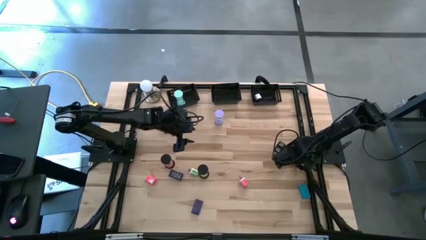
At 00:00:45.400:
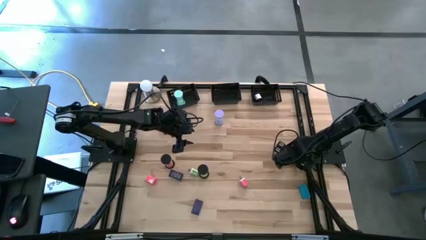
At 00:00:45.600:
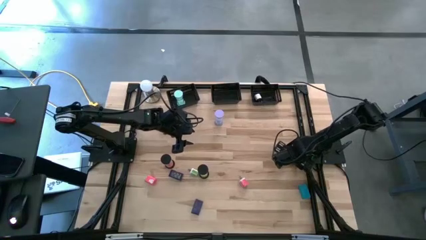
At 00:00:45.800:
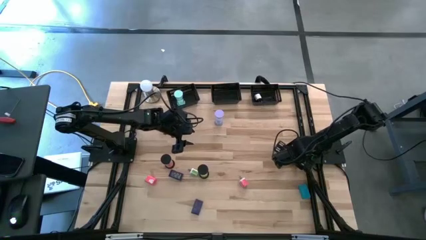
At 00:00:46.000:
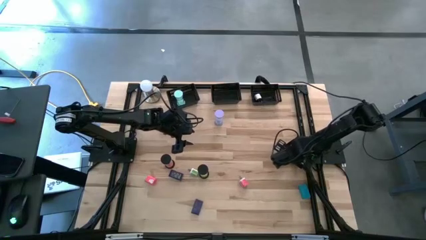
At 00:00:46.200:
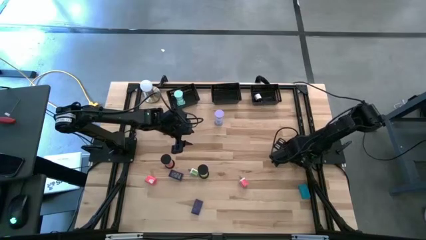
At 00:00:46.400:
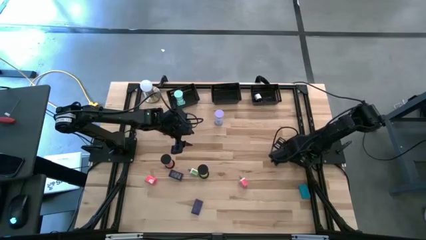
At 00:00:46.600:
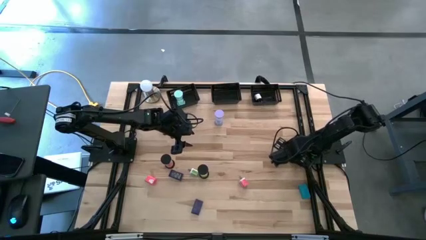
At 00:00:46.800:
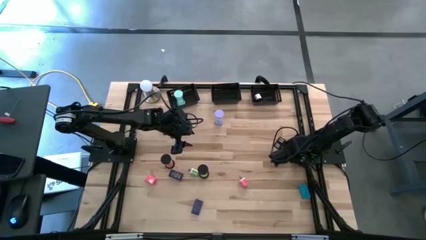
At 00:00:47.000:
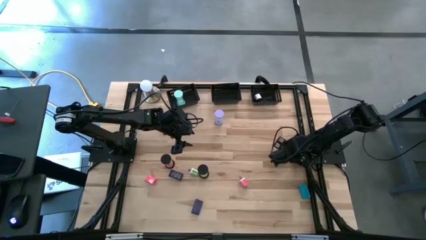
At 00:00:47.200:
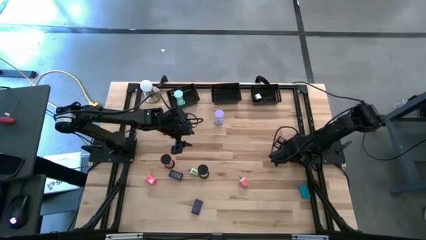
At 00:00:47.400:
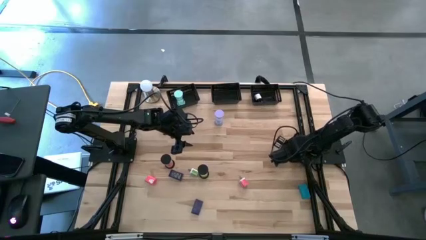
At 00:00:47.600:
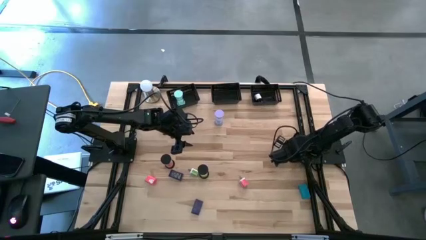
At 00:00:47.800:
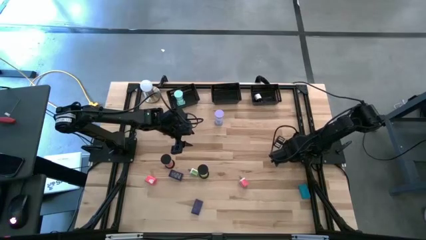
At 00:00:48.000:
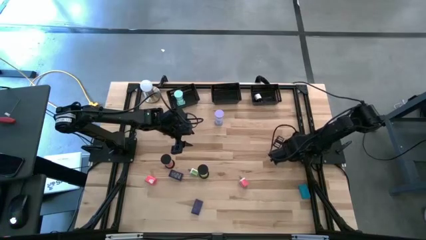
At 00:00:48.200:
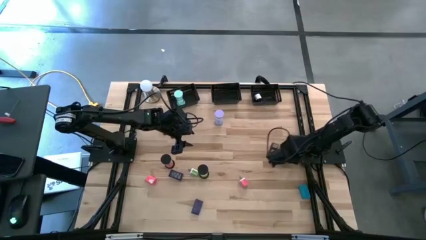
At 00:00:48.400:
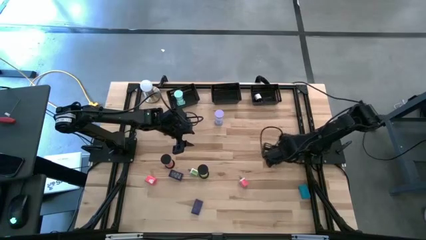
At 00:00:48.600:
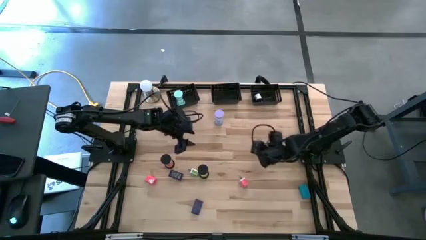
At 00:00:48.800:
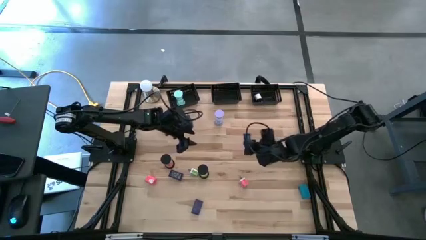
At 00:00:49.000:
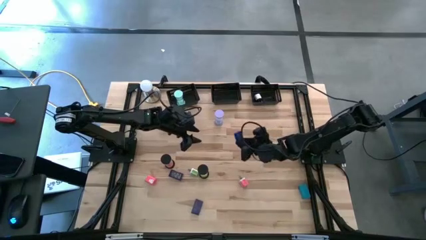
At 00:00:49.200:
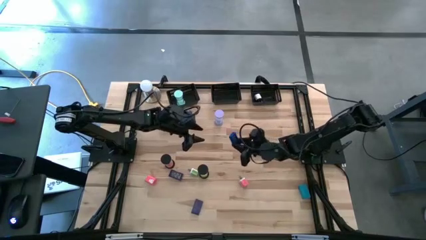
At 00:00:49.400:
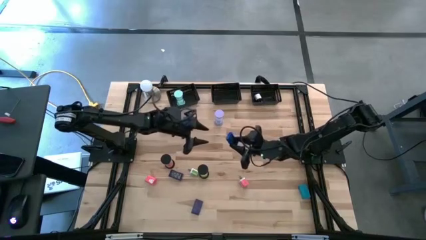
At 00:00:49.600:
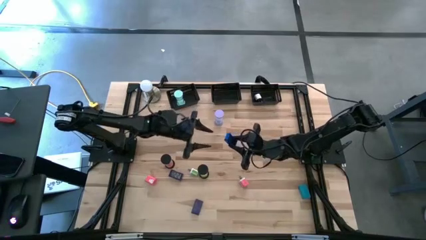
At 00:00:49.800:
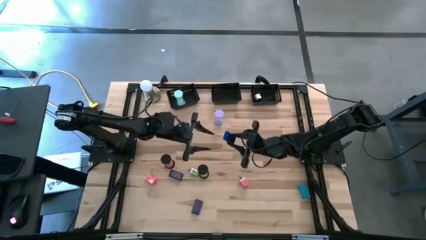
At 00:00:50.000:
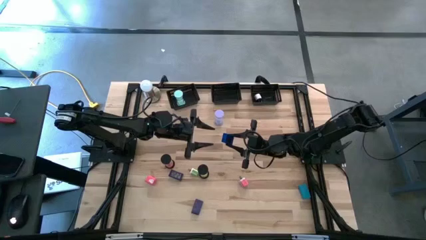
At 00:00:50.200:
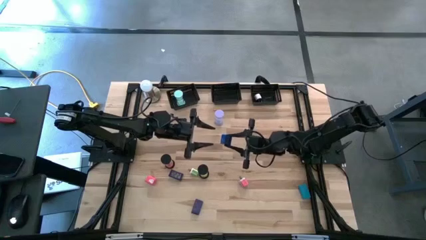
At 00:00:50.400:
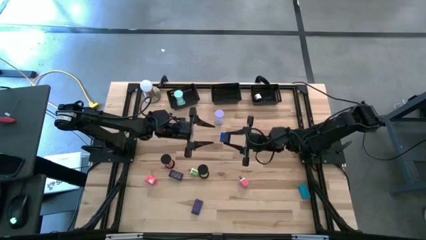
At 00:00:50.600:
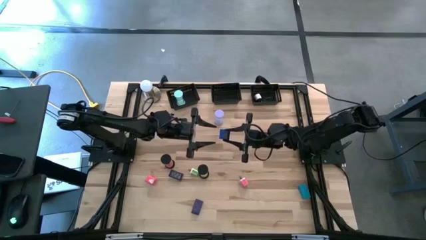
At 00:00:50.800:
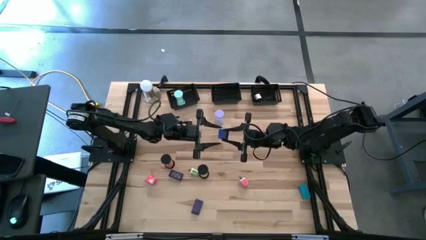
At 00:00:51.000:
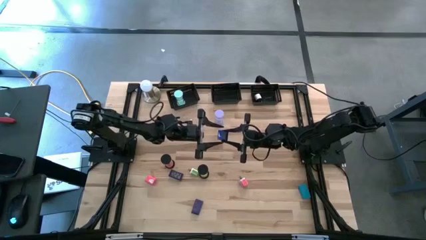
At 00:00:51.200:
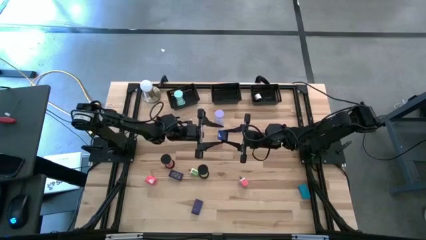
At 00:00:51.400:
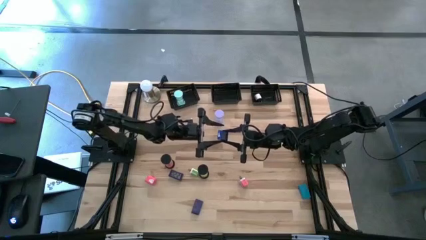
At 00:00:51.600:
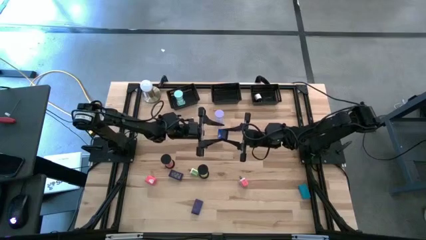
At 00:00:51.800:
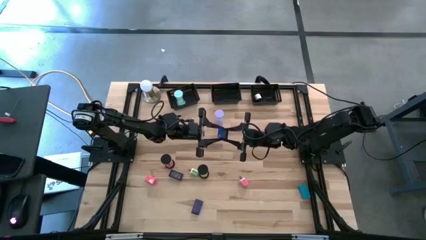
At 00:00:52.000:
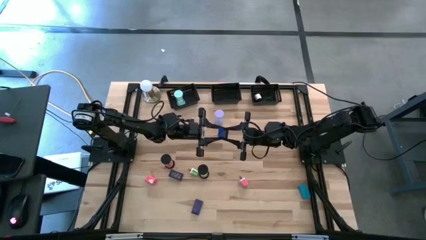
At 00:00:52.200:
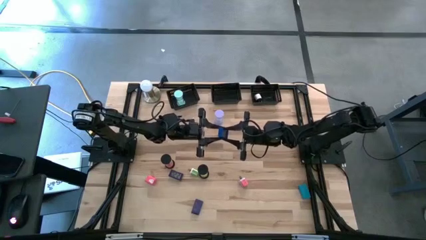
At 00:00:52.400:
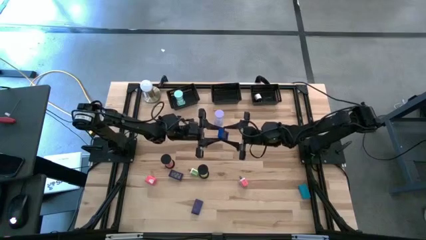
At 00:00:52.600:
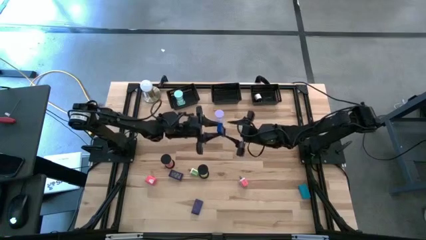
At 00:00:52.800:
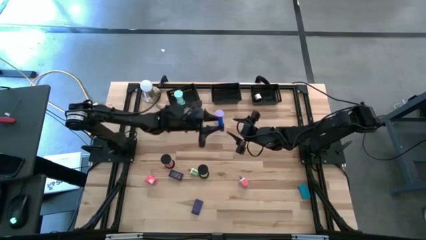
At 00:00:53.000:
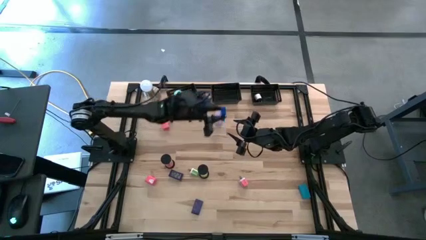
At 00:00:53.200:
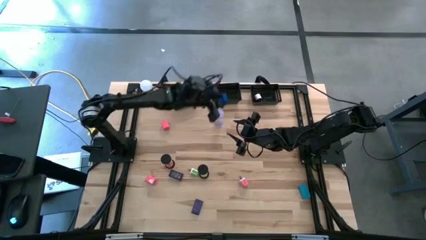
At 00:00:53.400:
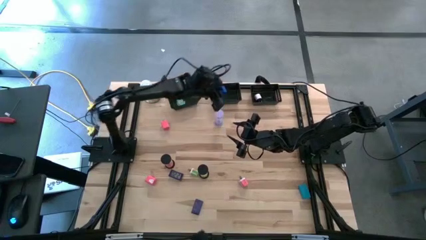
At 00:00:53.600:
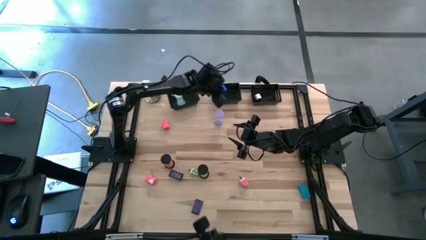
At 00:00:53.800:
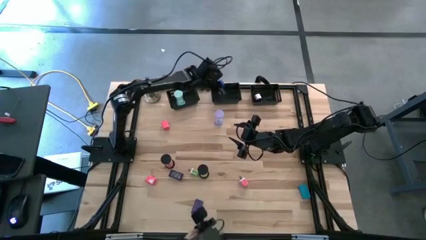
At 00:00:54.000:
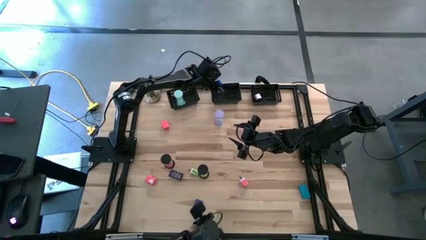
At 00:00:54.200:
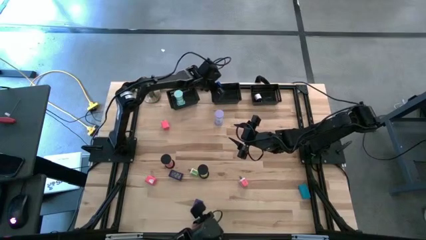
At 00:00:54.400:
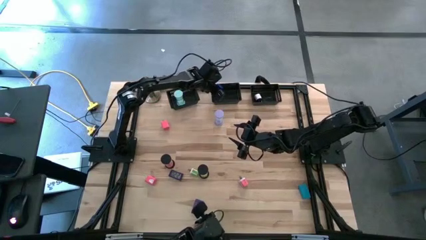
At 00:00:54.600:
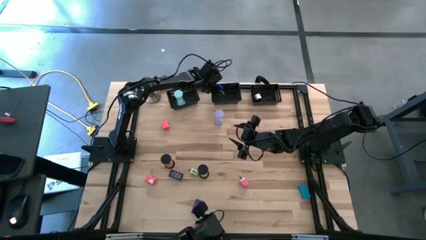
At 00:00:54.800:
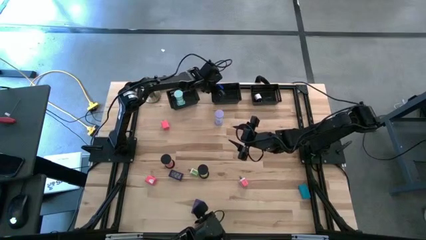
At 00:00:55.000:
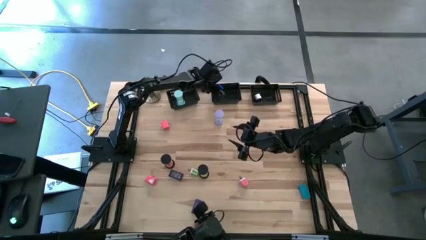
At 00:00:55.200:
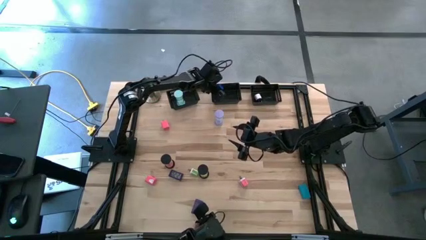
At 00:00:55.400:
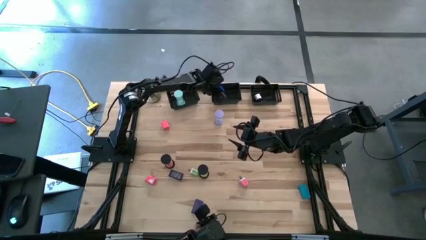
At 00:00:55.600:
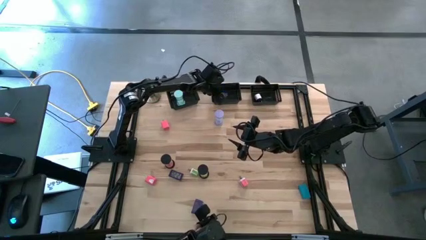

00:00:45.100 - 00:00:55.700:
Task: Pick & Place Office items
Put the dark blue digital clock into the middle black bin
